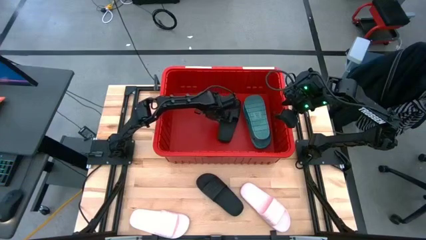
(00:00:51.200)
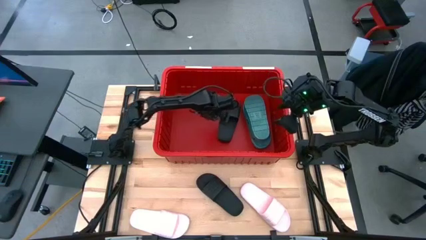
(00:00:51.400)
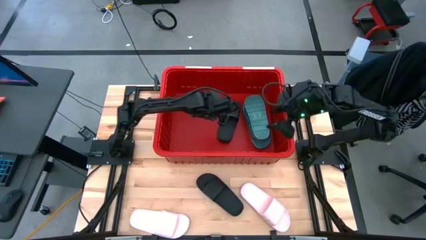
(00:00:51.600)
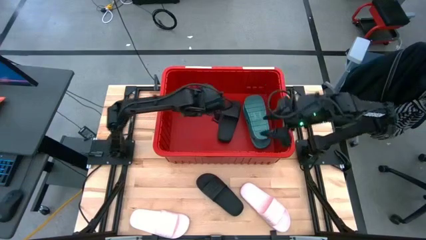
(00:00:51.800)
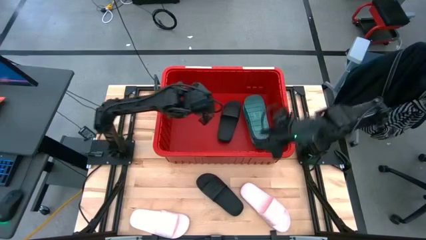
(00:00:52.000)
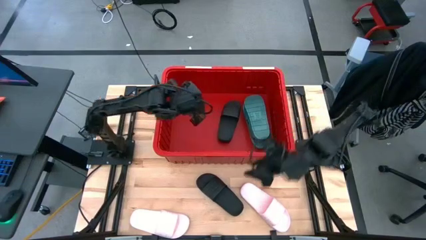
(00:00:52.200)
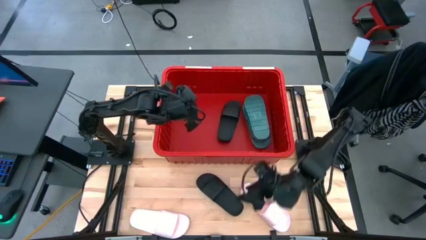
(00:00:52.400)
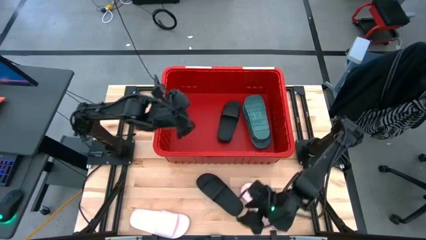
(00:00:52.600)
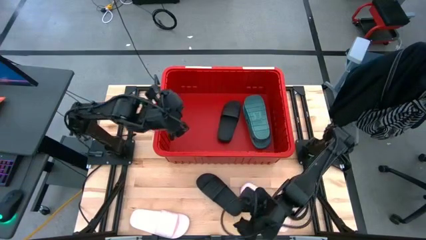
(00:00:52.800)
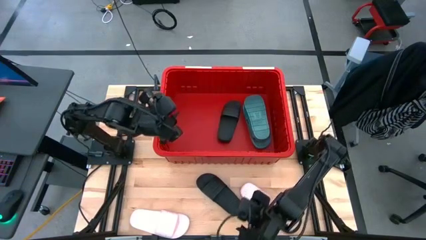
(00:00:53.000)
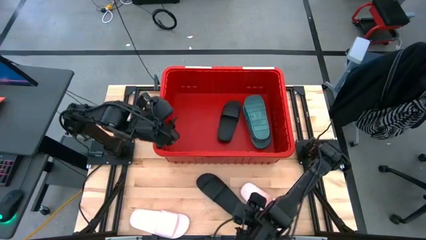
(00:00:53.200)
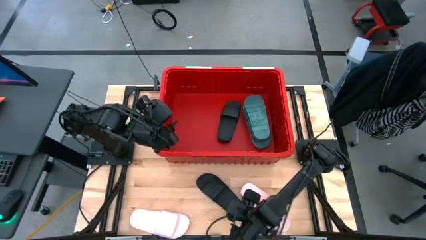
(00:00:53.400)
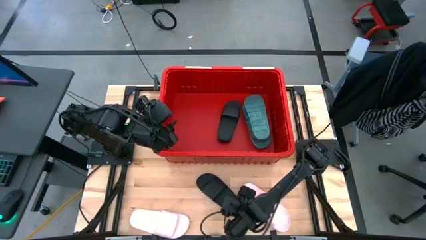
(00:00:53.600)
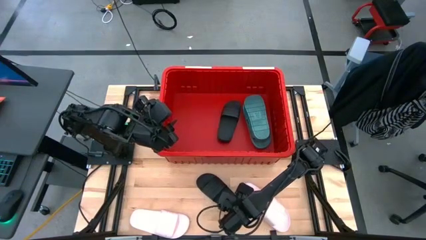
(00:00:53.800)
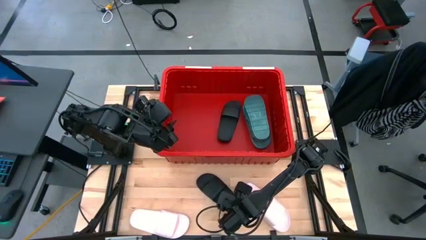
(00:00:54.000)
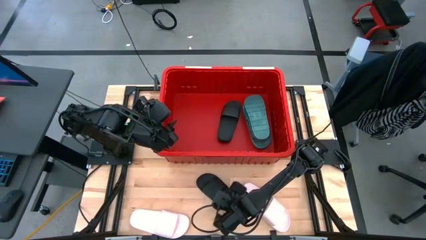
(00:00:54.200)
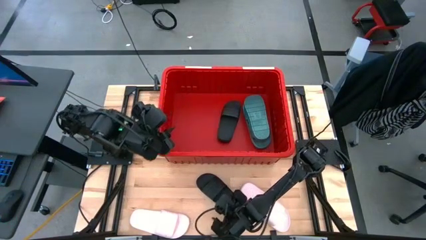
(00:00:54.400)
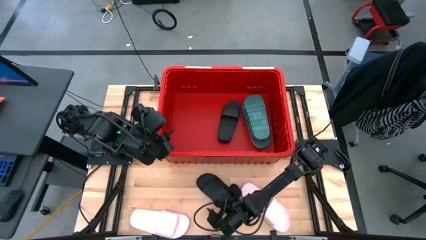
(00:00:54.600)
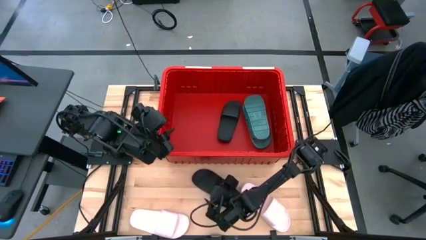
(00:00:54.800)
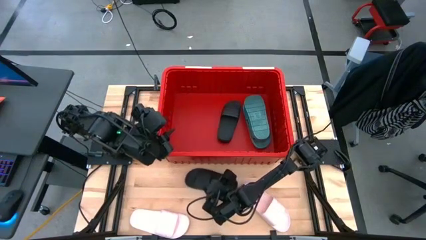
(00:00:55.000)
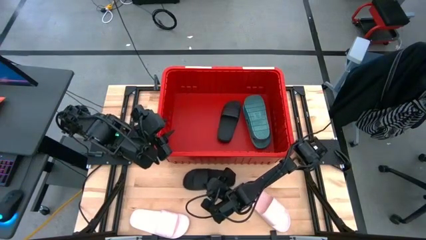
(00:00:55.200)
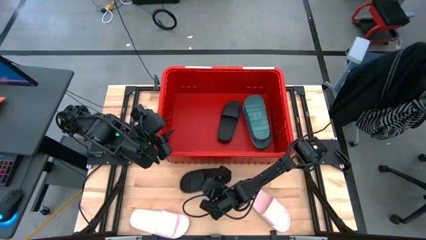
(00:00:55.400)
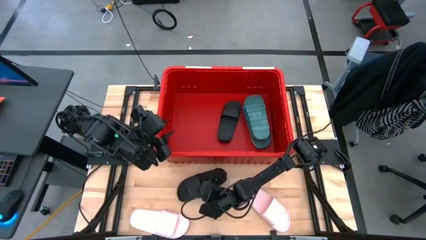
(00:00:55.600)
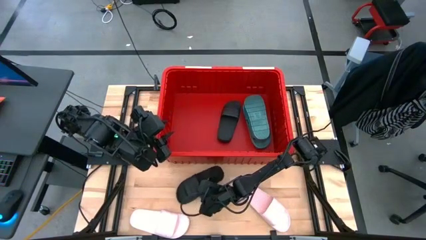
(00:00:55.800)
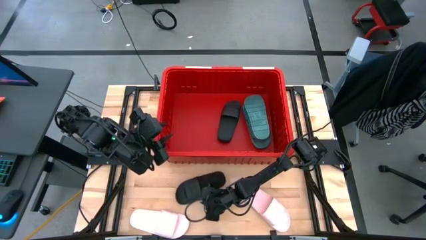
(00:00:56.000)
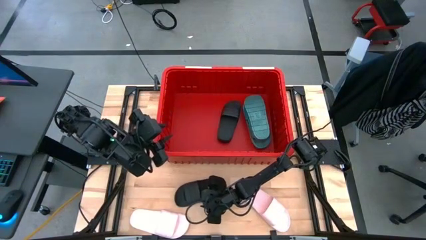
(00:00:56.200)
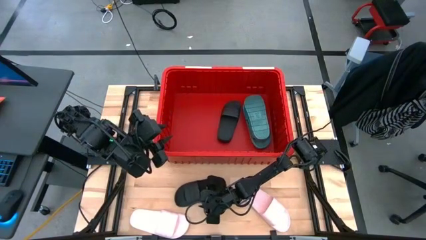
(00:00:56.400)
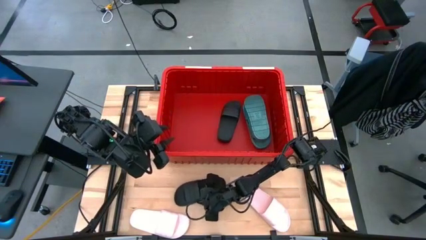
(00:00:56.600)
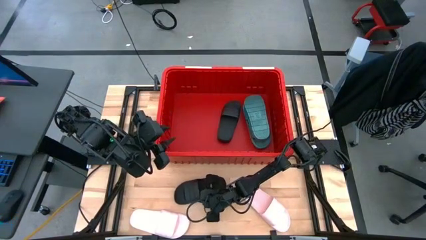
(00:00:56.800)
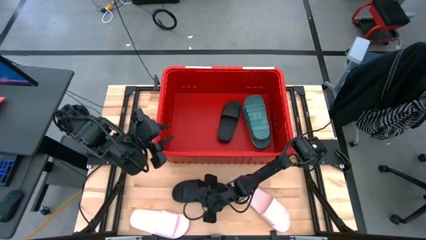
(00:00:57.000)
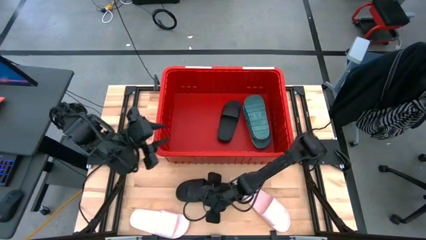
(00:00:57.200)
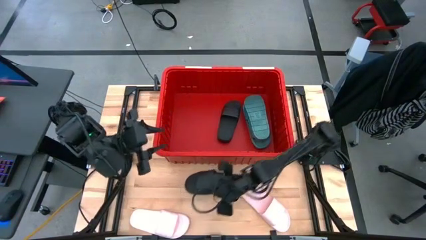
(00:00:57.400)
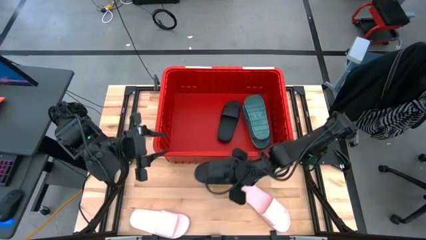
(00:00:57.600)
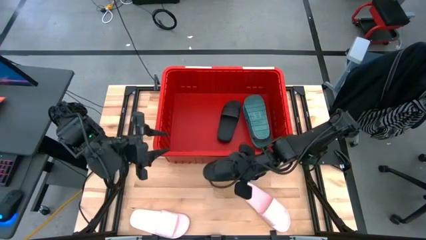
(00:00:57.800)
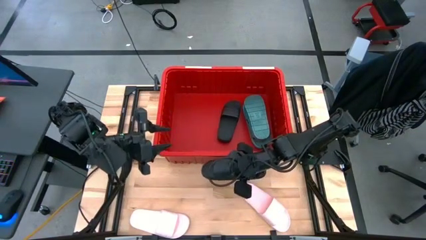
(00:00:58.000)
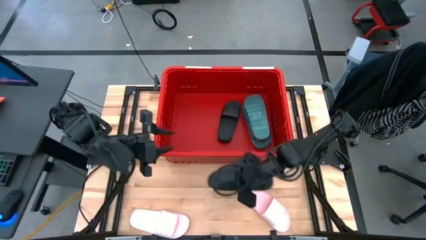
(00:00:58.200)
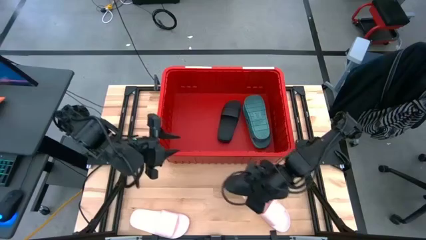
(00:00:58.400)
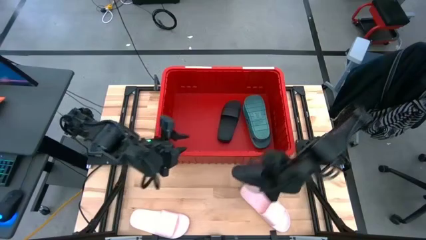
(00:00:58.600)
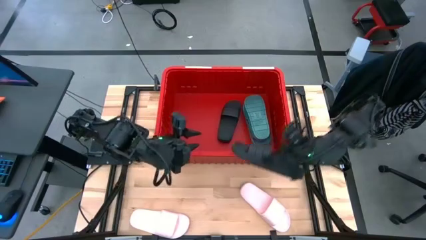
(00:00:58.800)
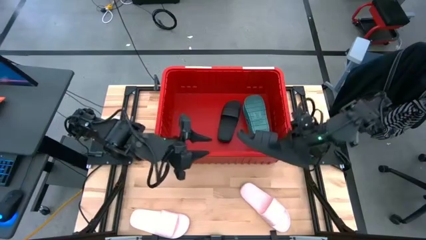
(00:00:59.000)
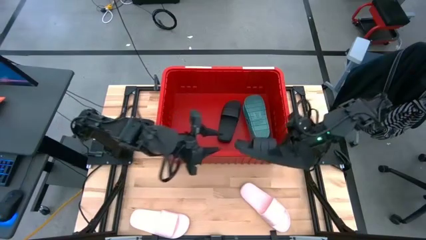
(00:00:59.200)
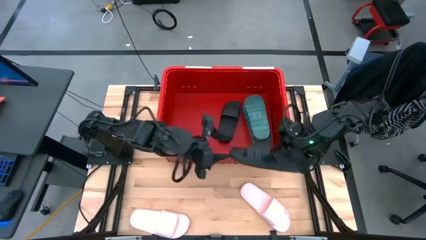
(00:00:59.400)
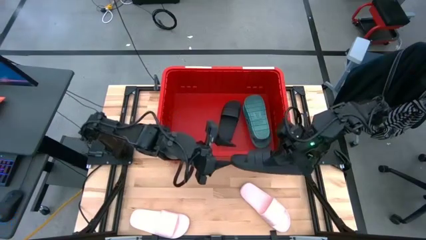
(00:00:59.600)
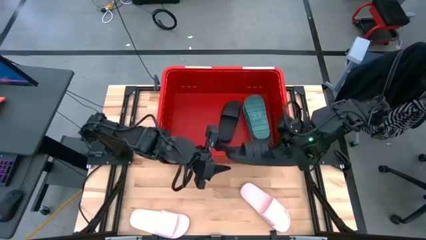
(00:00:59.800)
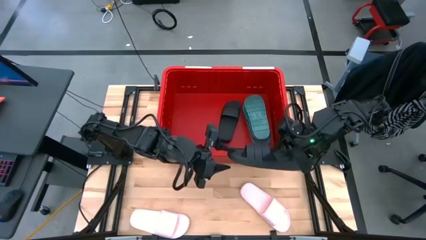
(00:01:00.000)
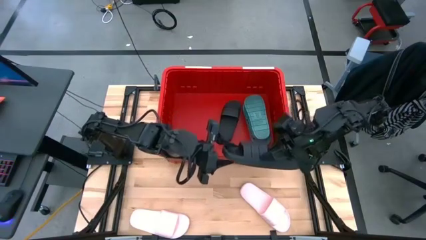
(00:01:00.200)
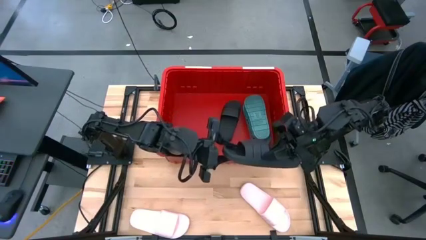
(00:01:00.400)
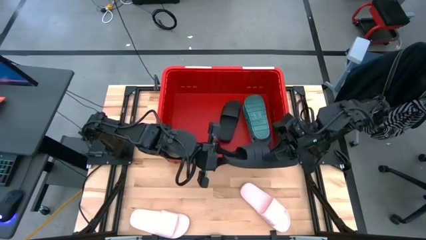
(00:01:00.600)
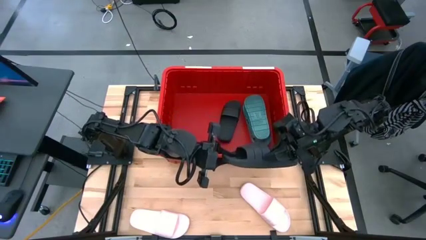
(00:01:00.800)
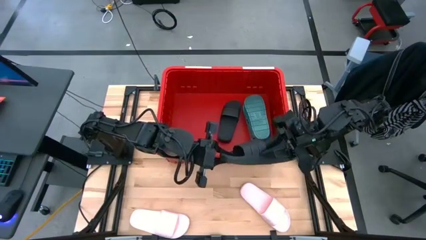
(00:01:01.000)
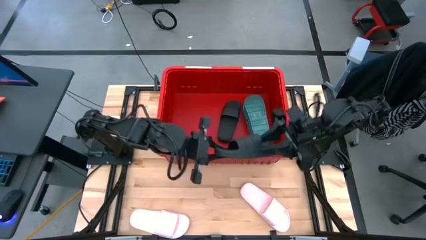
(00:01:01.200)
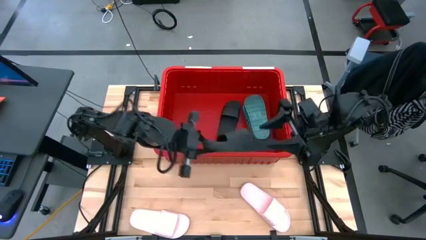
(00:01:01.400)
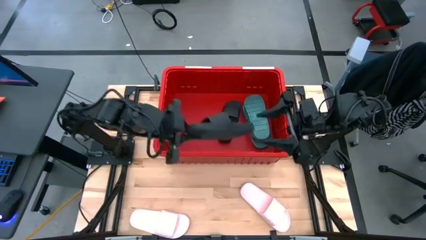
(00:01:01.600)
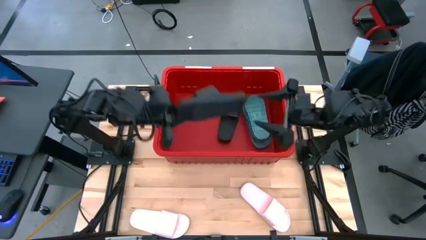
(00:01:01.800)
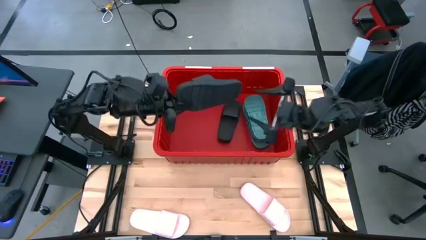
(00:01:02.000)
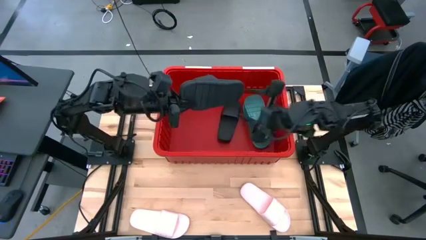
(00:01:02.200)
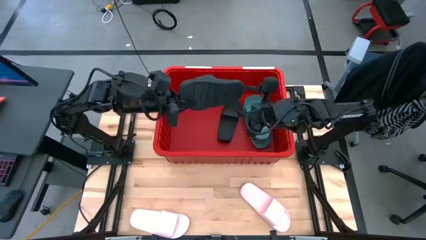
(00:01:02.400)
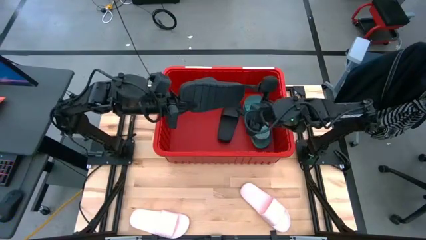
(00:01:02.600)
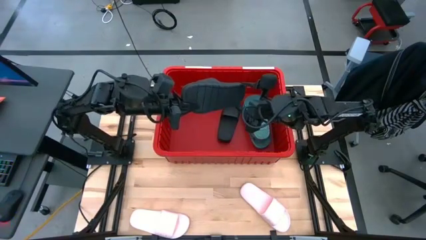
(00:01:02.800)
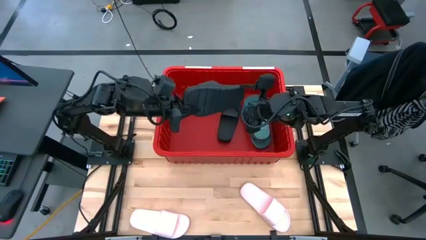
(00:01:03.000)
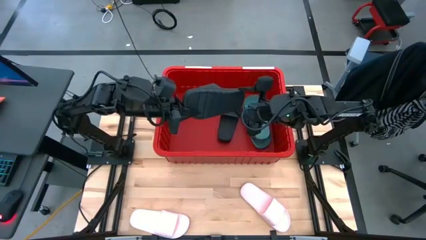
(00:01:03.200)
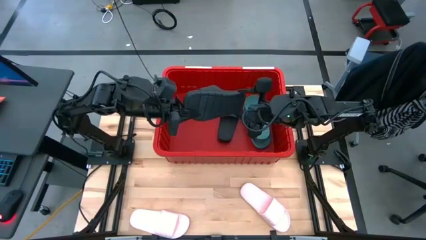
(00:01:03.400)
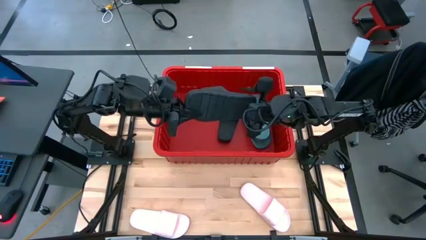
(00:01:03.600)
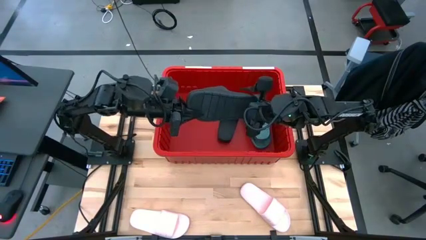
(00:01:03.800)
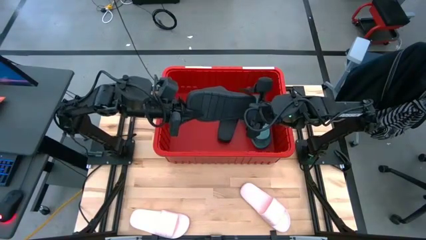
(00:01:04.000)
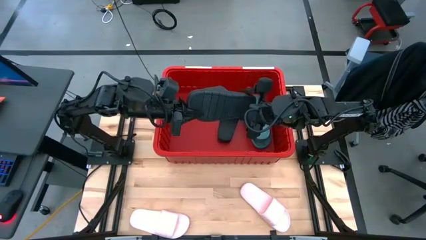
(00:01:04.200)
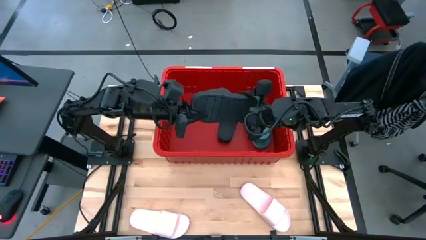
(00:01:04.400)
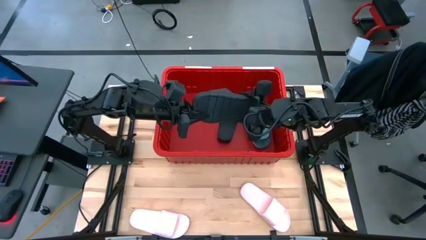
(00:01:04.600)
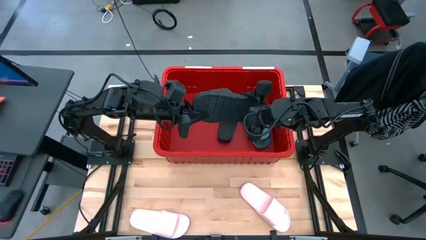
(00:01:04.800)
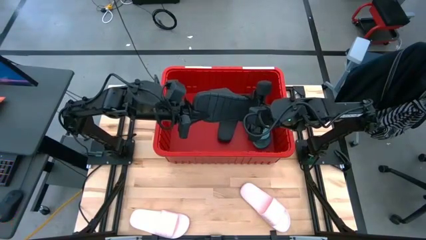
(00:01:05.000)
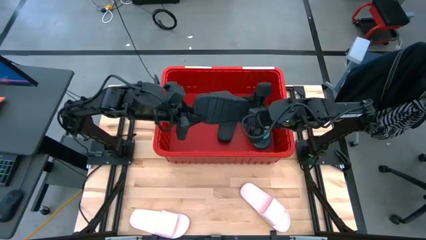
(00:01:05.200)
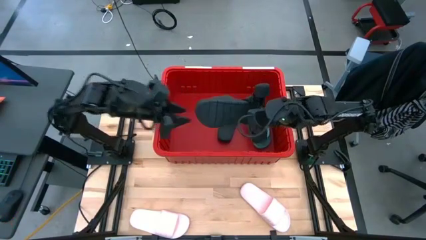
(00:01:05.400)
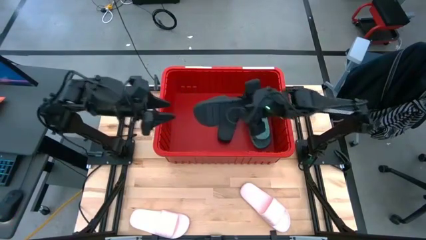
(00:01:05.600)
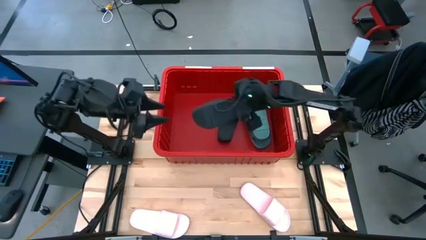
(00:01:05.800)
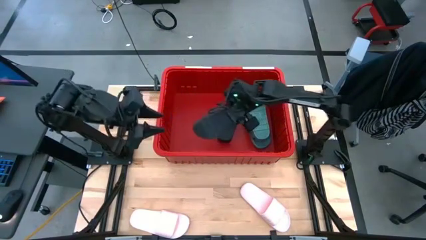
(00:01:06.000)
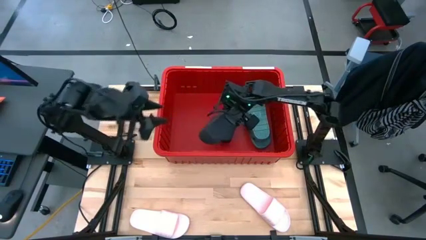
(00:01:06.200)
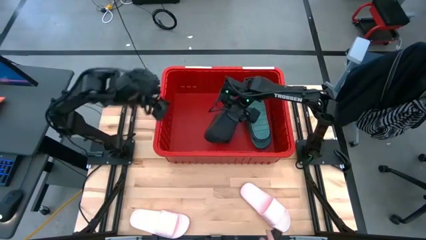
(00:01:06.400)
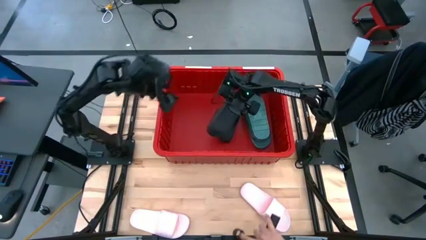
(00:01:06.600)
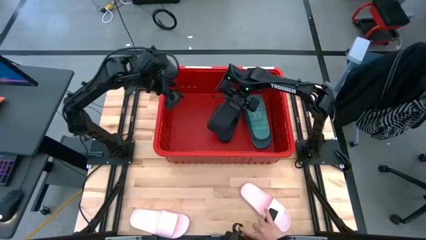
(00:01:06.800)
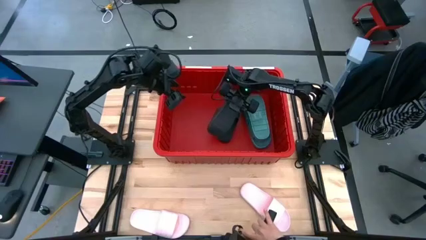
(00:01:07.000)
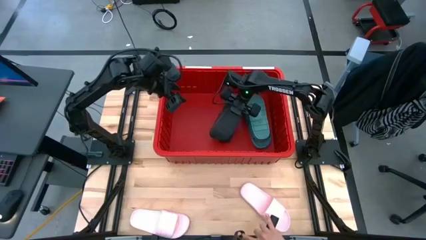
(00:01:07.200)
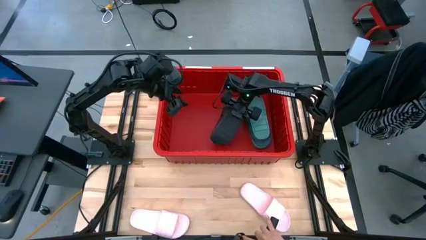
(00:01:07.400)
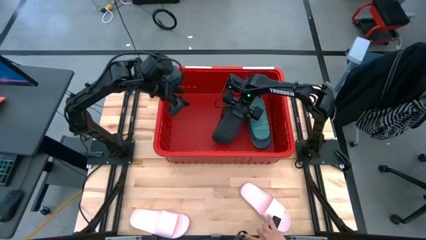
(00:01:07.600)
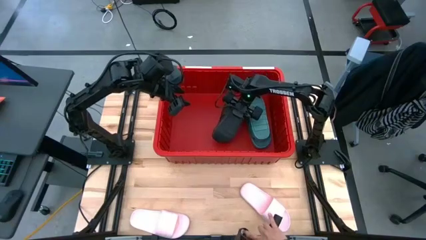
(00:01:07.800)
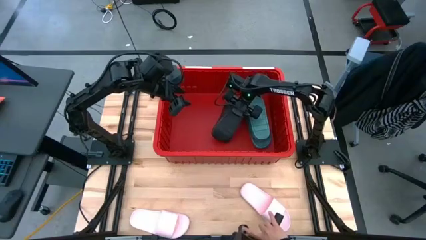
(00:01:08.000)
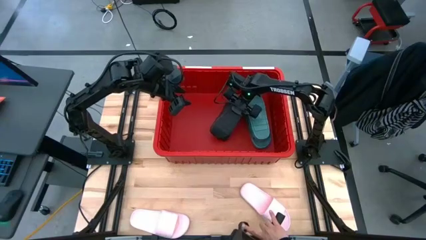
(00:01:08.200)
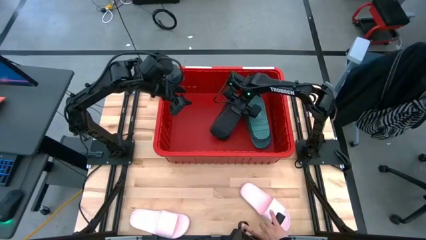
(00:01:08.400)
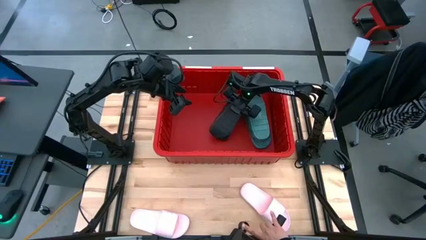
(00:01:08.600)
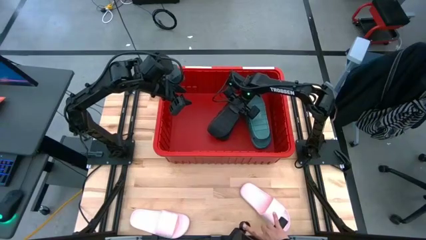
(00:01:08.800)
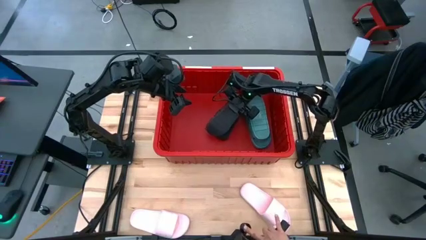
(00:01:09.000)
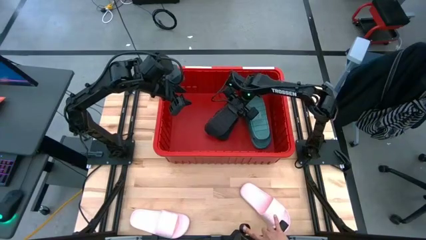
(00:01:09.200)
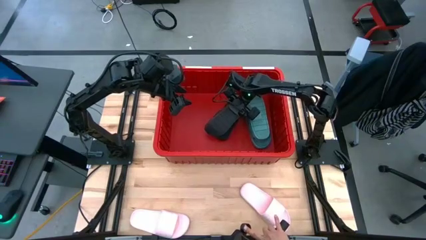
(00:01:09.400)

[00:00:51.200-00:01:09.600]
Task: Pick and place slides into bin
Put the black slides into the red bin
